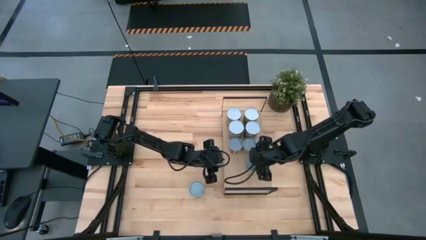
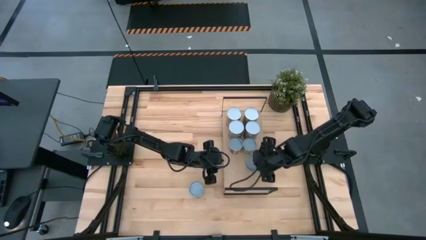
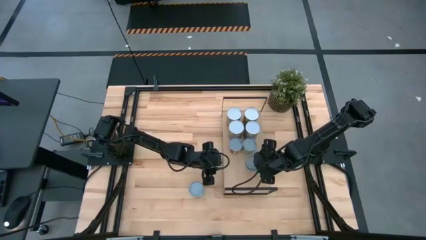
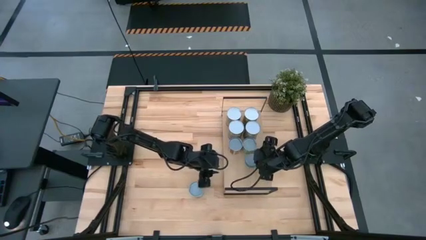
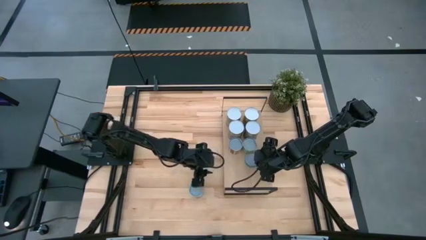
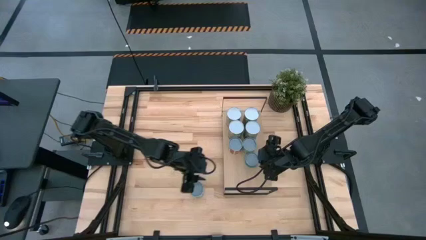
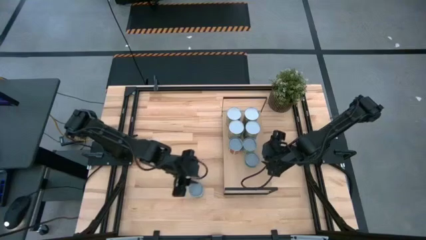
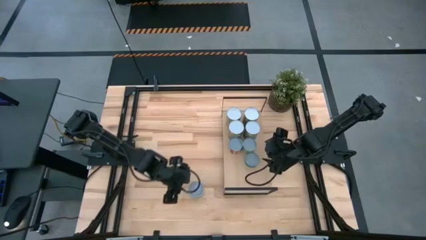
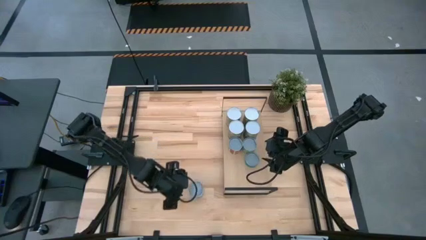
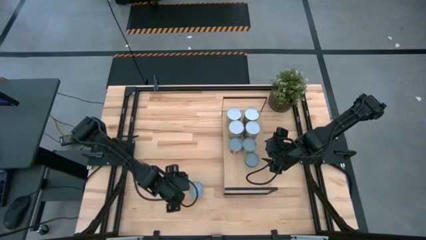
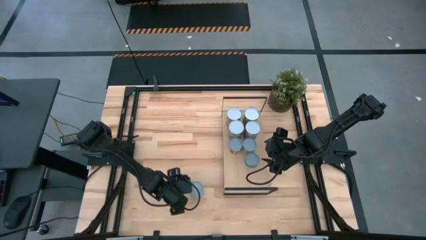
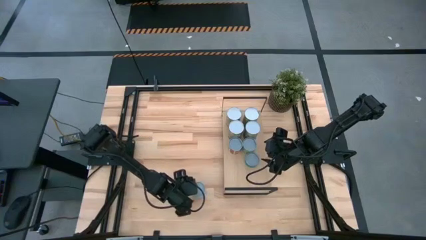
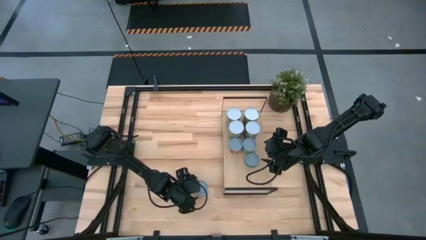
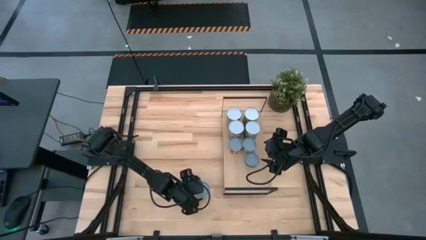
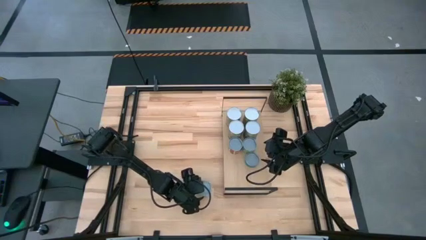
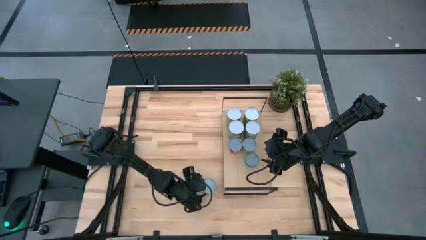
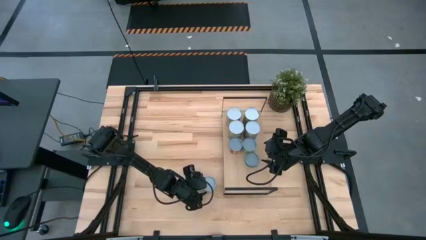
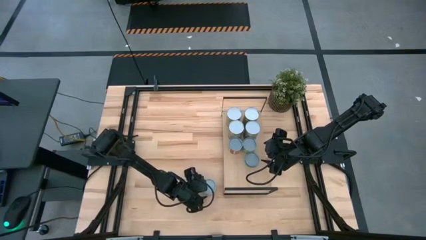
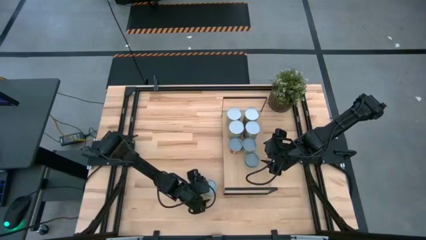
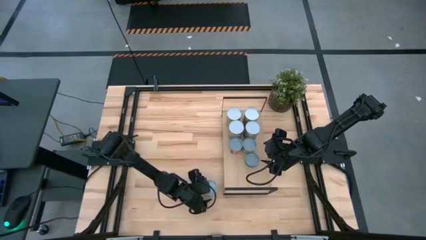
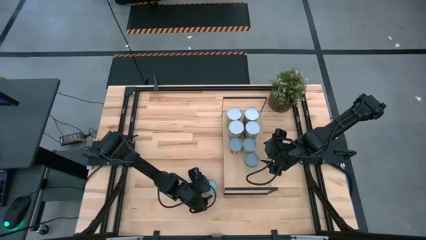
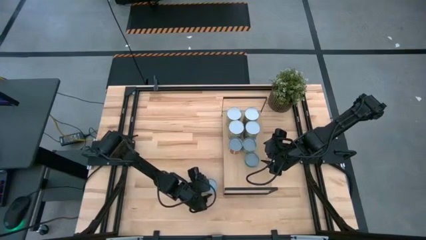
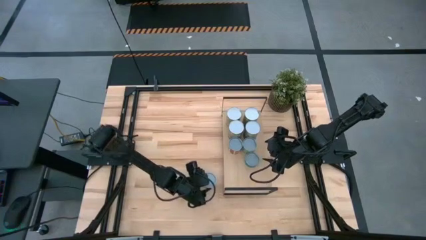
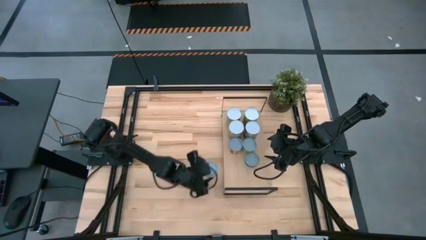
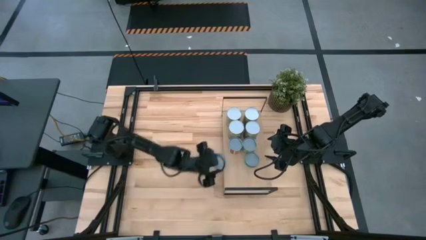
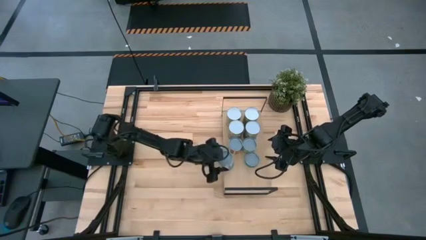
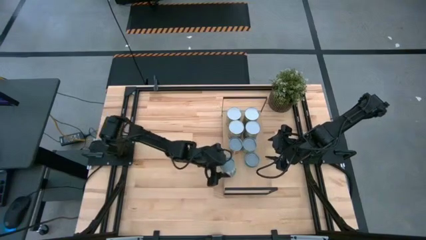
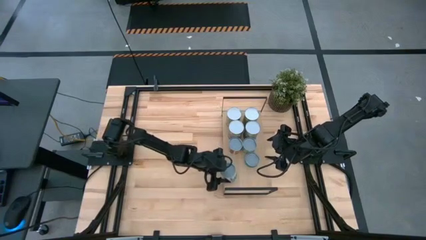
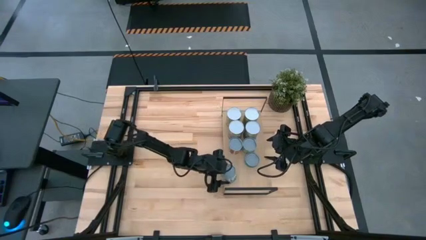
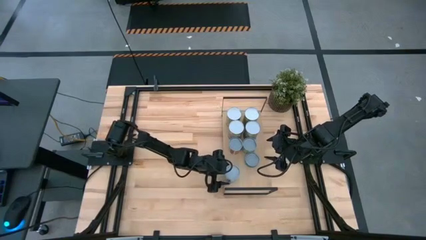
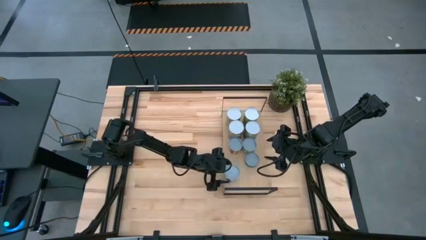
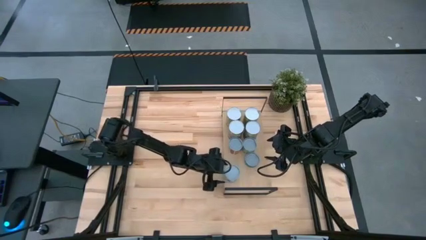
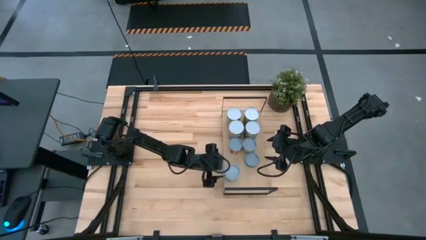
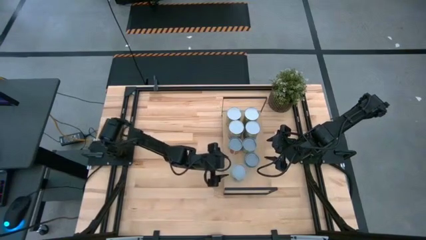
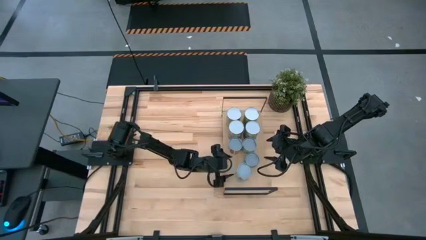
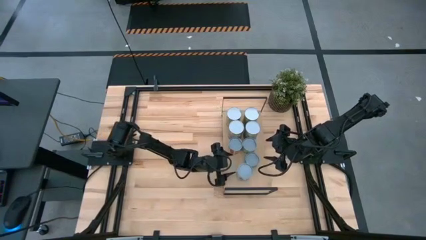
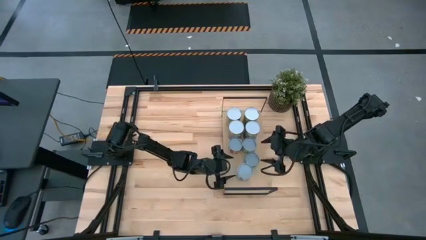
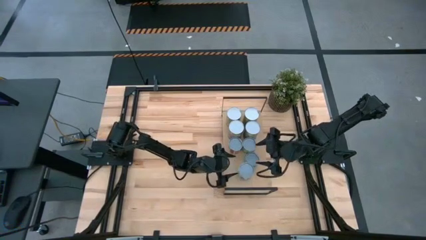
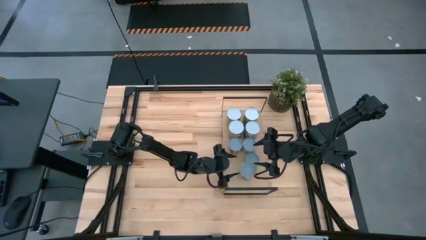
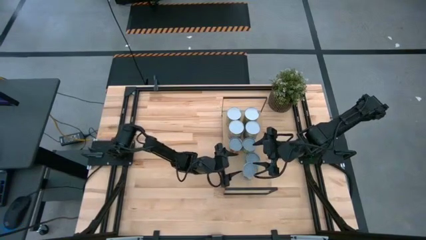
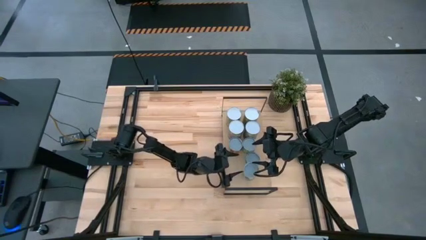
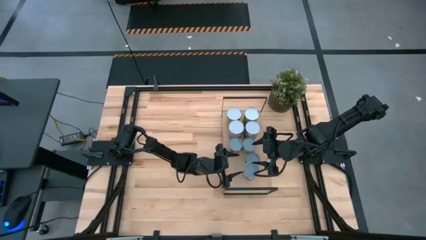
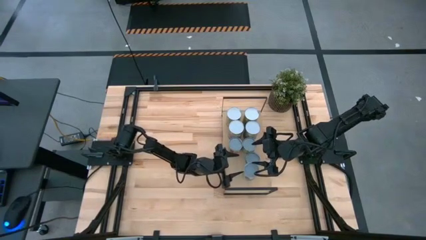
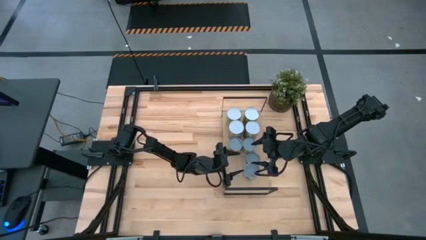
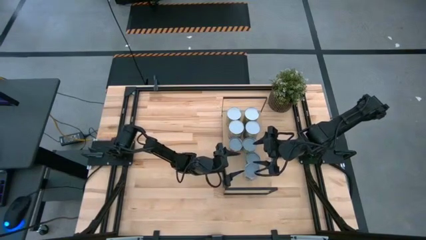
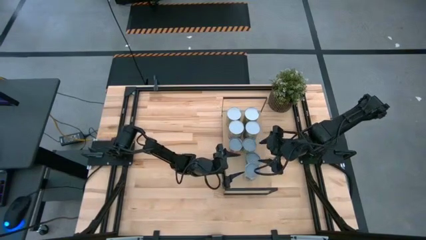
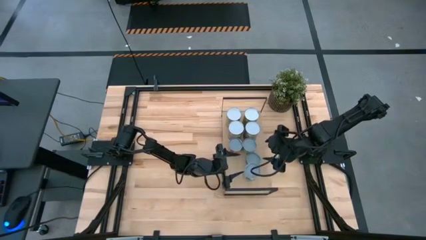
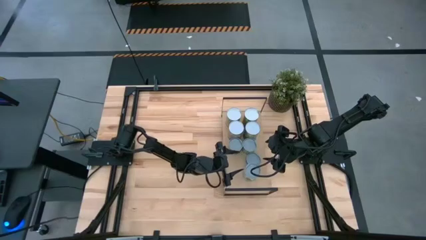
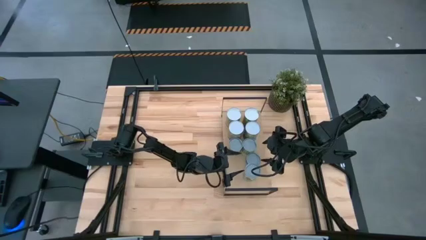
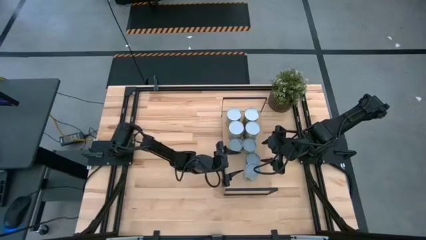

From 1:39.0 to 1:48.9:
Task: Pick and place cans onto a shelf
Put the canned mixed vegetables on the shelf

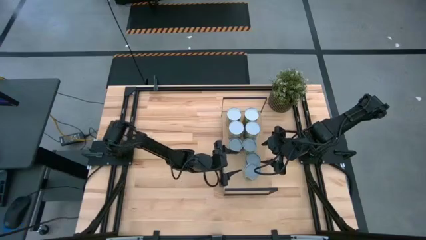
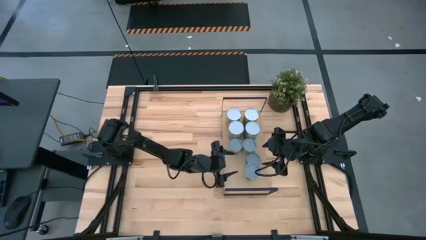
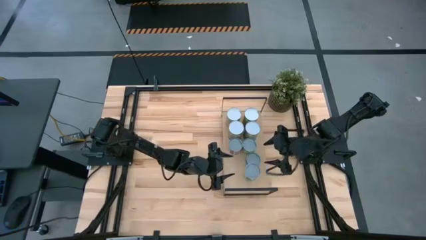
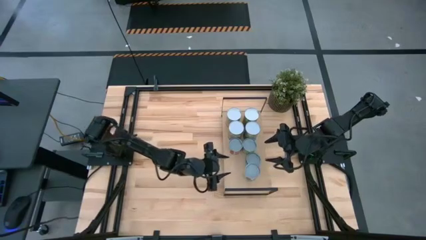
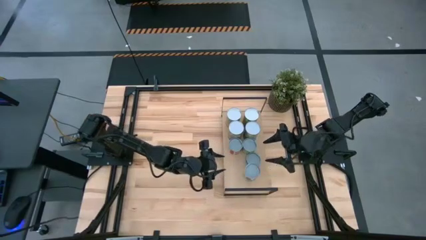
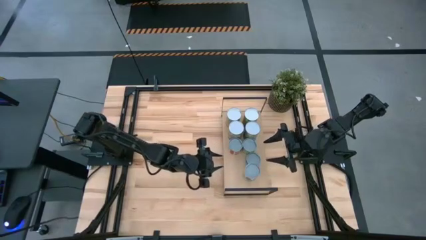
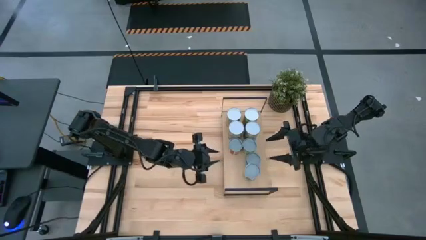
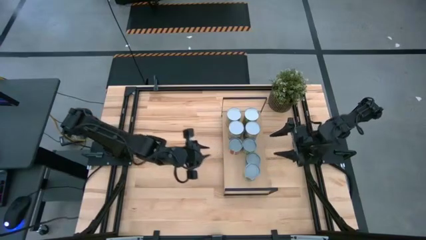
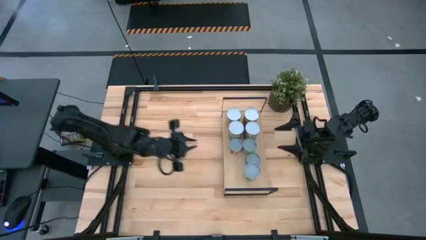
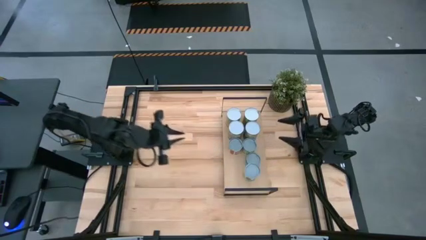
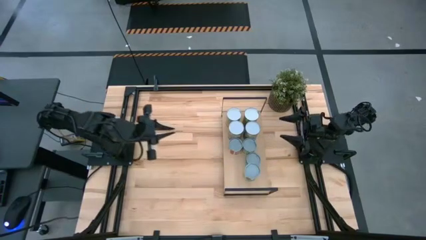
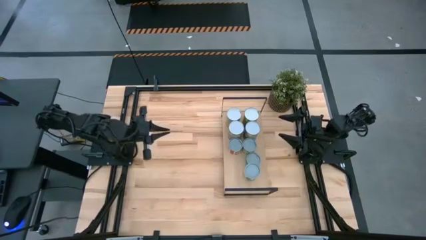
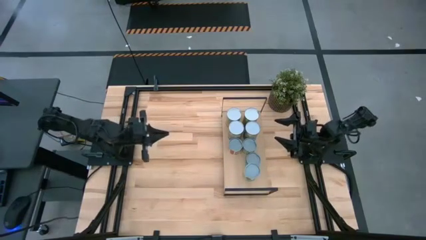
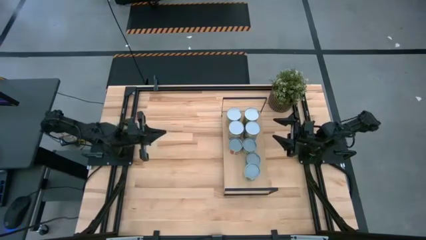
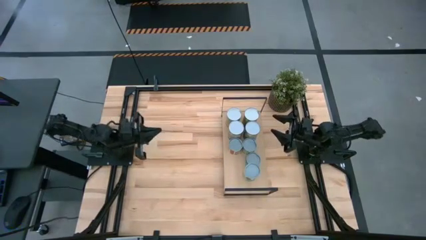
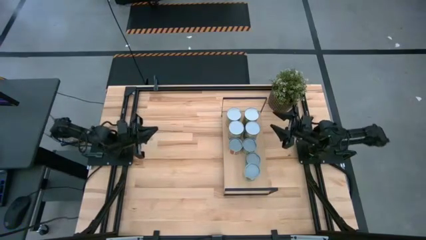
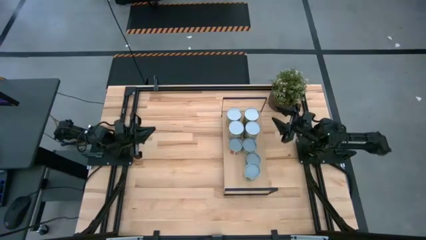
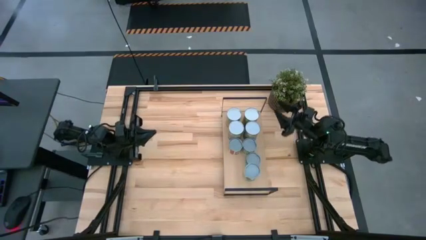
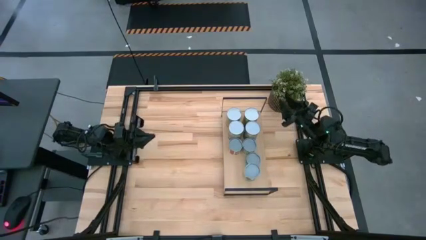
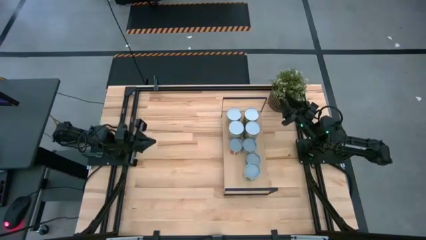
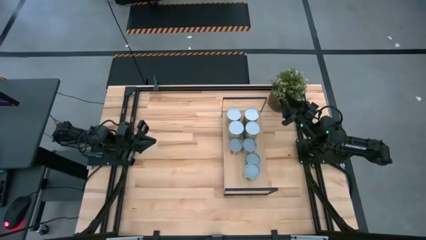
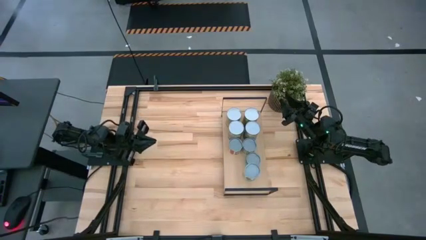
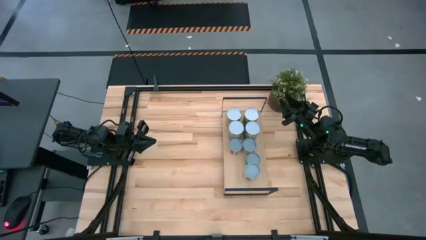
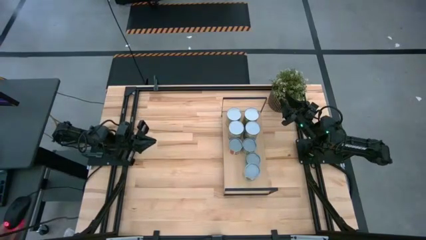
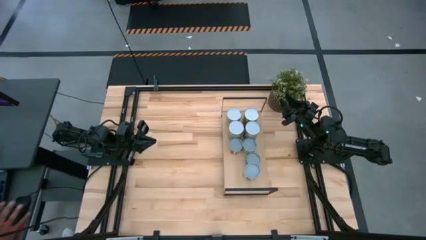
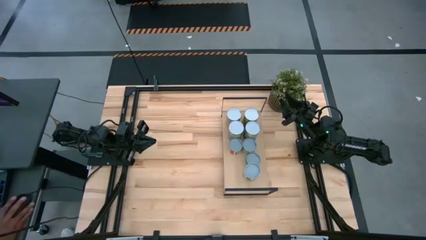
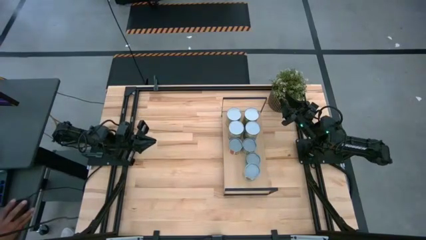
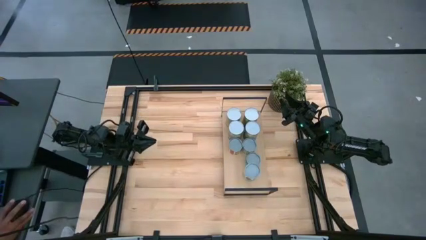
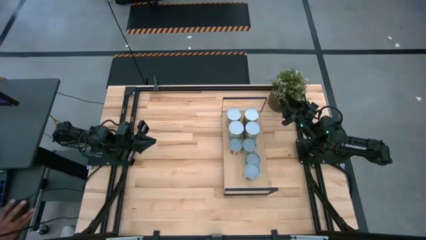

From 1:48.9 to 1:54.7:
Return to home position
